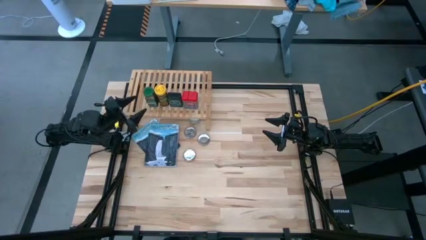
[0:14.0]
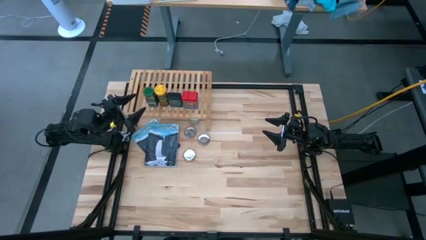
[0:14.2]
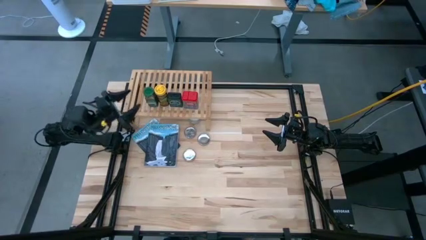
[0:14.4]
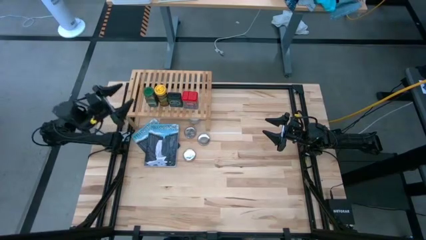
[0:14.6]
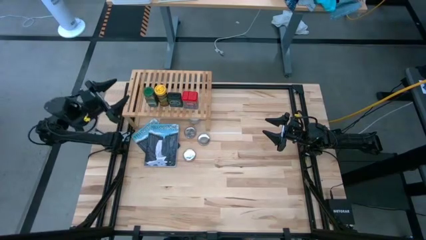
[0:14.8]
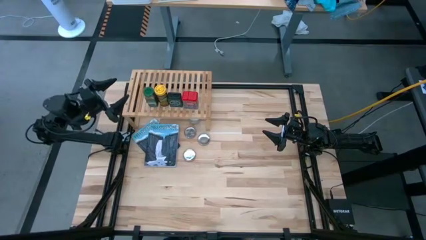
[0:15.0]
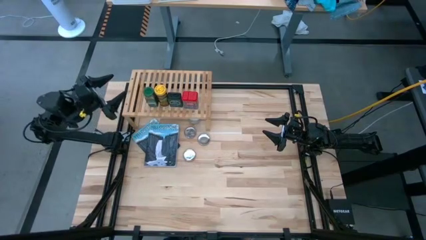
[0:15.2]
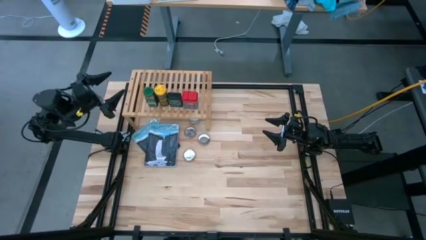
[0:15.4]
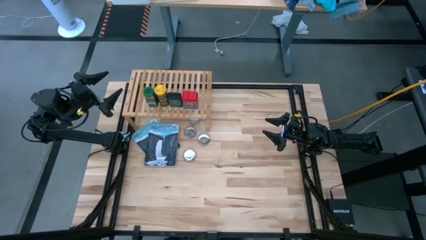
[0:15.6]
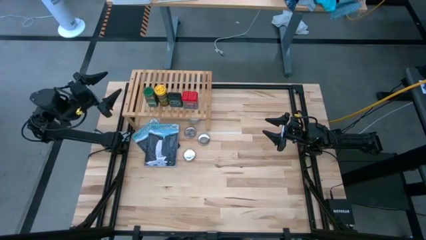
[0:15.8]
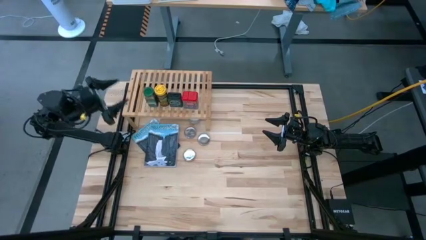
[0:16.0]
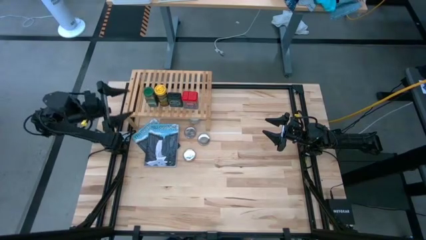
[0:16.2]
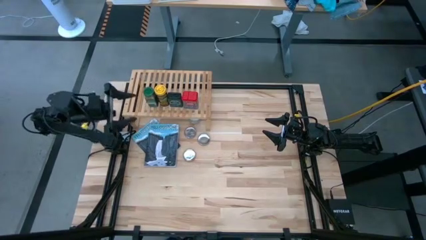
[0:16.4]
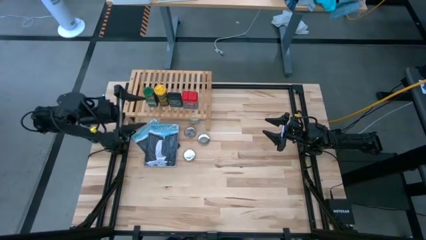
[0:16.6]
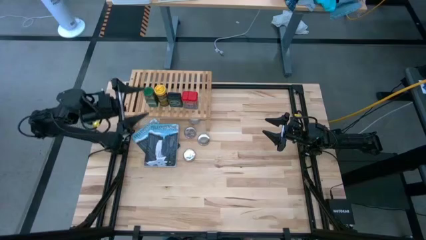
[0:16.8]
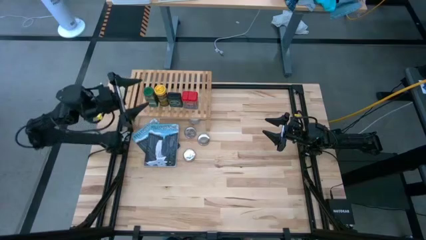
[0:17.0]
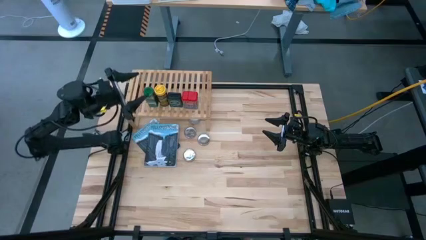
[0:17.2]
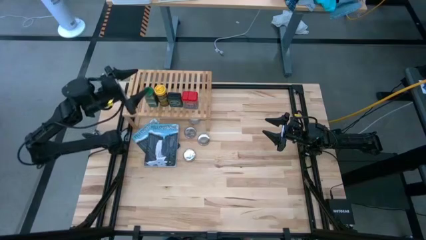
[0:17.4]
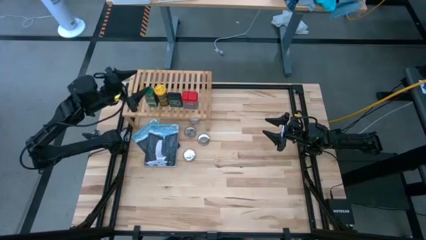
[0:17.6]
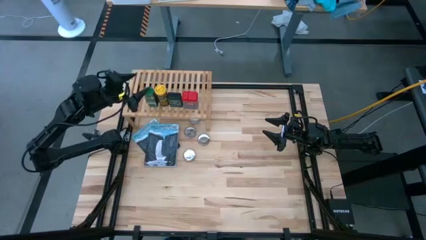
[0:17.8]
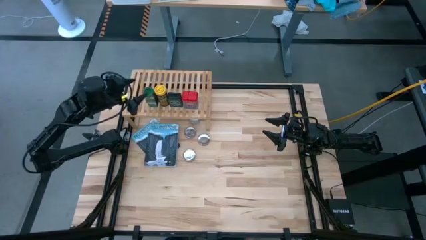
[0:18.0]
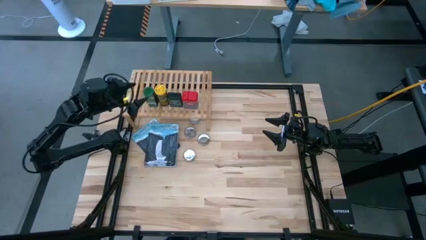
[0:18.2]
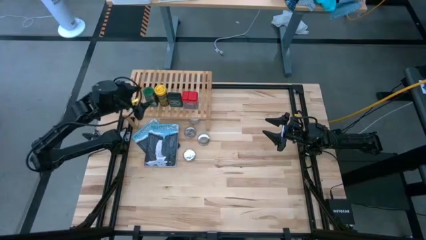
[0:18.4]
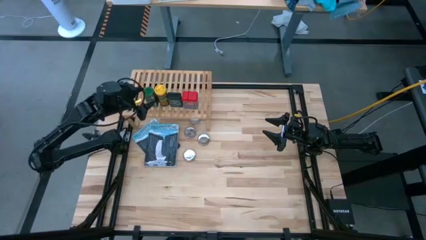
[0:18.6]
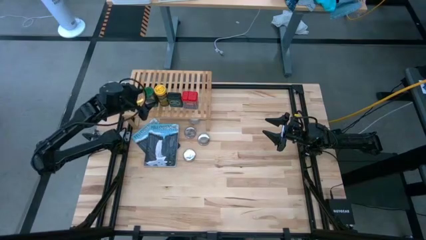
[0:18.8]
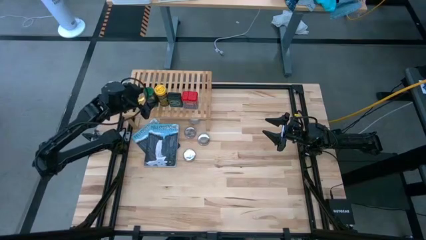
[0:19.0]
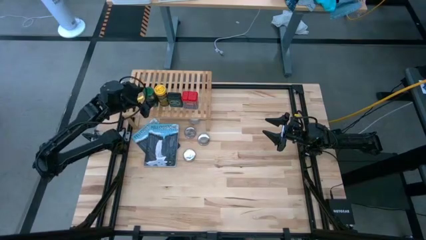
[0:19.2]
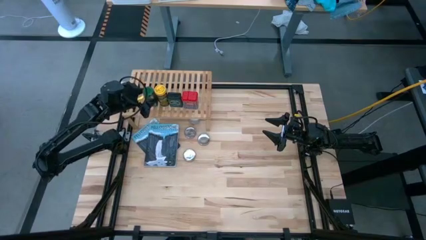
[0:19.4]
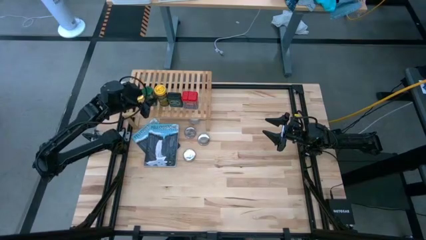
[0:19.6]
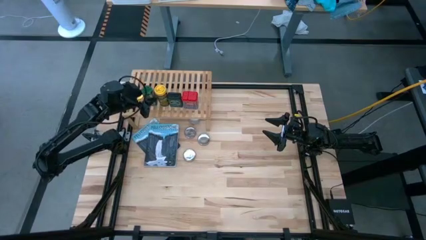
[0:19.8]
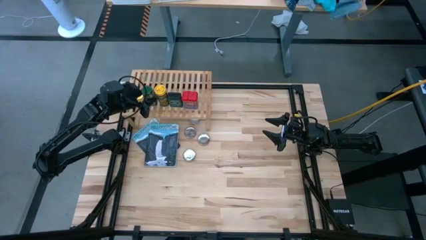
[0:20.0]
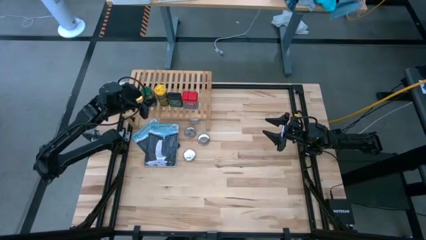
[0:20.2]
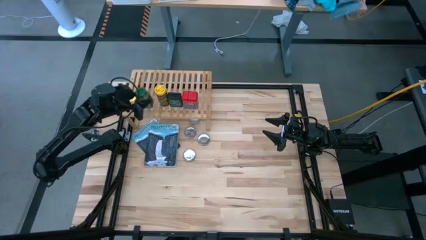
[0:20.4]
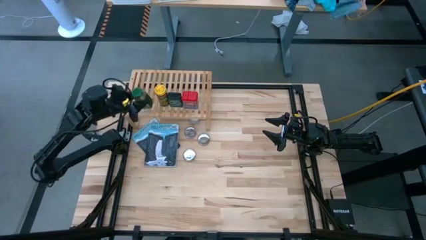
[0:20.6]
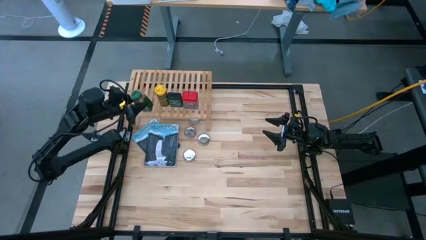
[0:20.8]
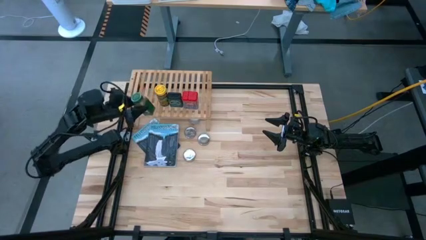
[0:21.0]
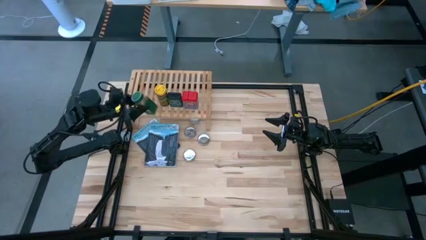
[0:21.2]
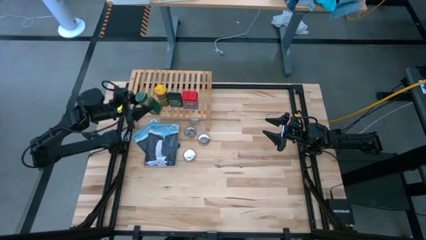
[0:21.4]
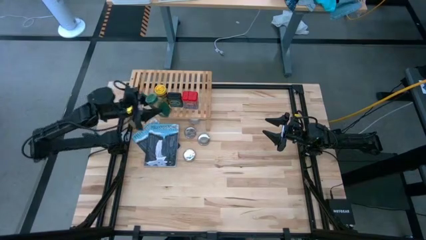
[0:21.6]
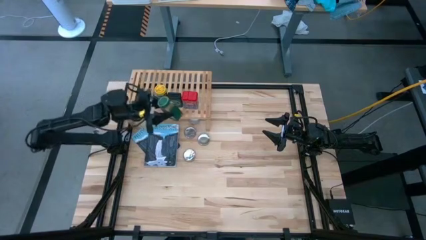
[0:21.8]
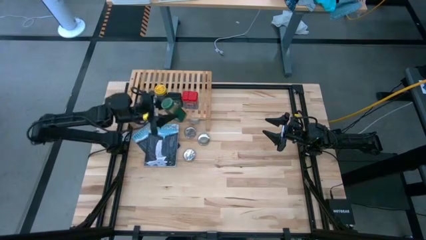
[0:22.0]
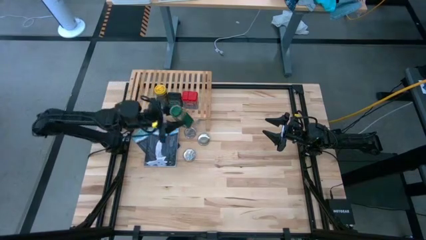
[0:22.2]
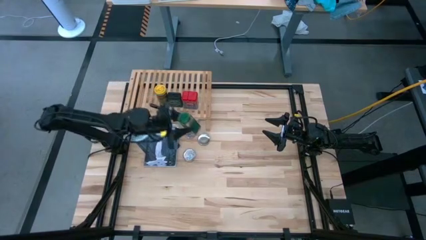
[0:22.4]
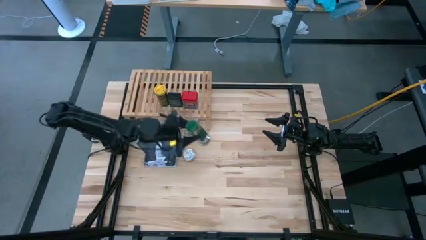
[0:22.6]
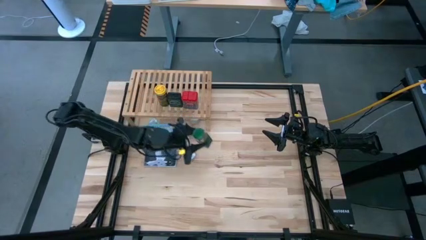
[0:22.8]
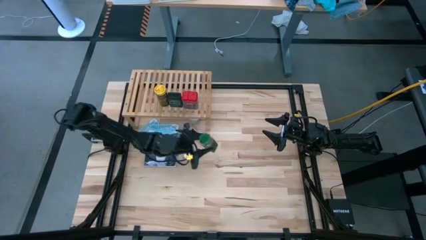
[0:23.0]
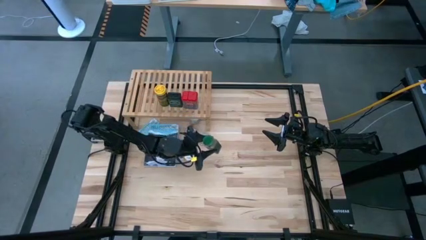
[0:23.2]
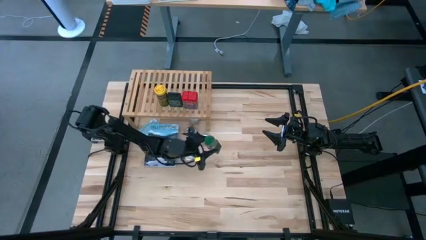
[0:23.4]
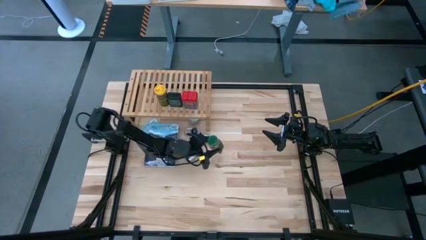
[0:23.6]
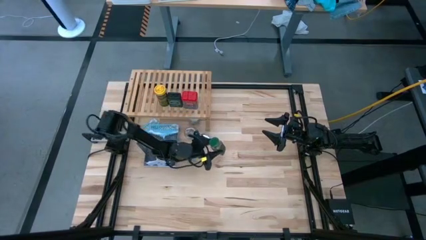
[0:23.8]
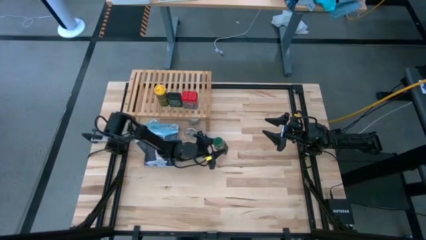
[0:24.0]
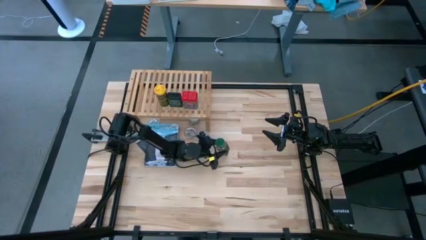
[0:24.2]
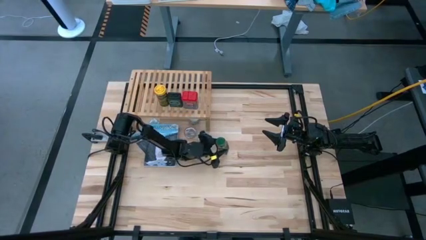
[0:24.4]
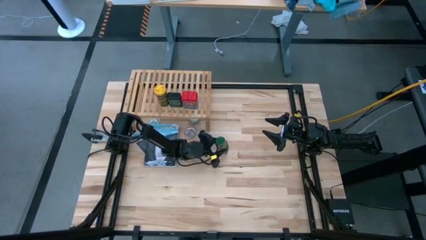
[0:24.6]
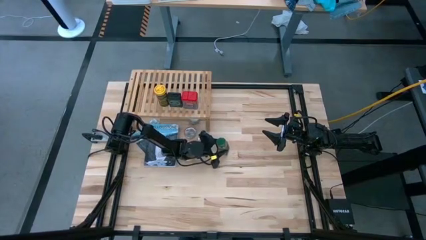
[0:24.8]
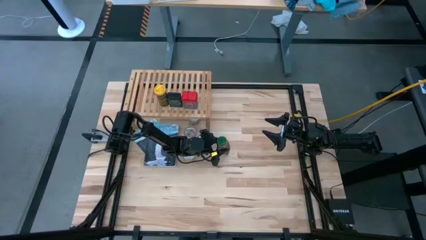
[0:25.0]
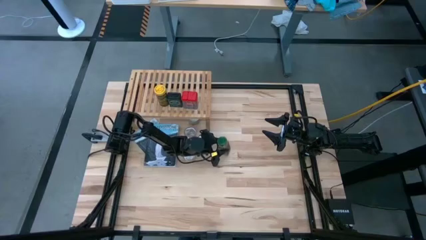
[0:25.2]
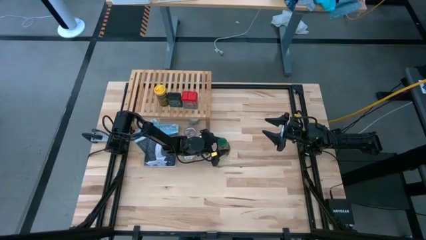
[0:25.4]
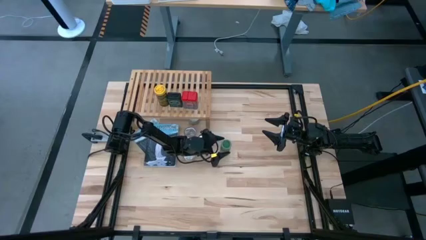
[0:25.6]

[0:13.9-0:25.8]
Task: Shelf spices
Remove the green seasoning bottle from the shelf

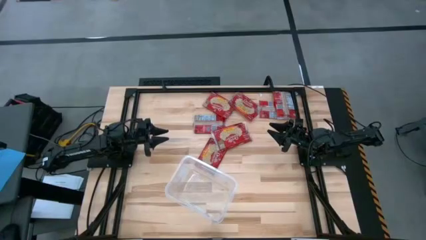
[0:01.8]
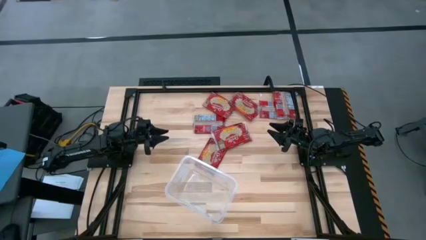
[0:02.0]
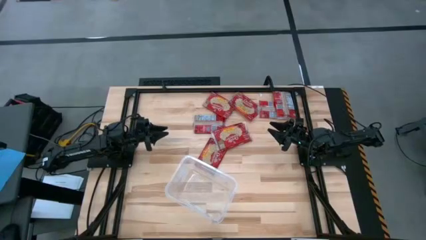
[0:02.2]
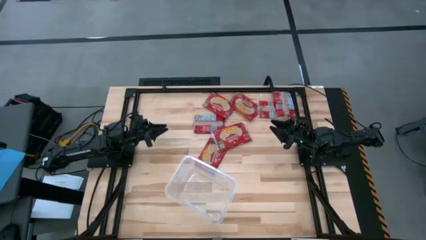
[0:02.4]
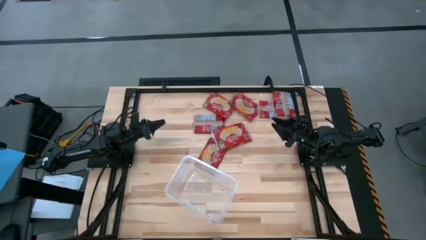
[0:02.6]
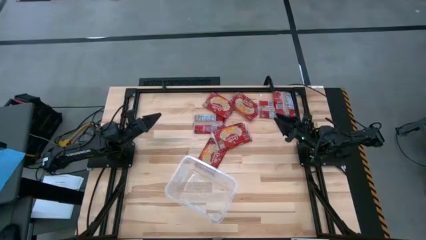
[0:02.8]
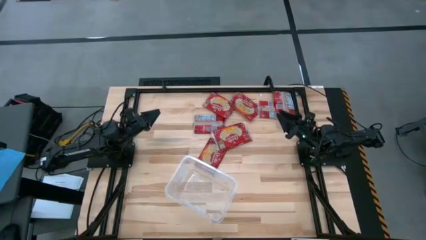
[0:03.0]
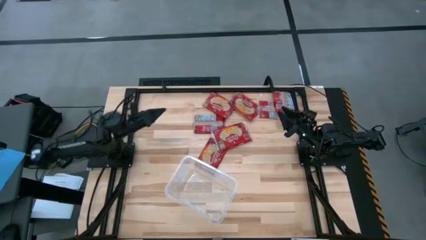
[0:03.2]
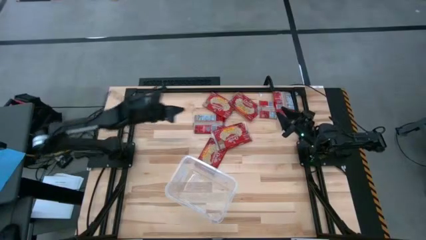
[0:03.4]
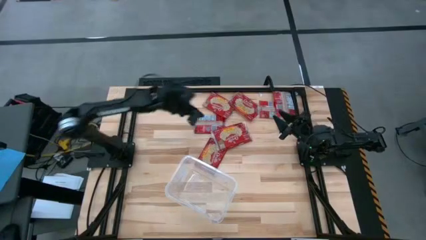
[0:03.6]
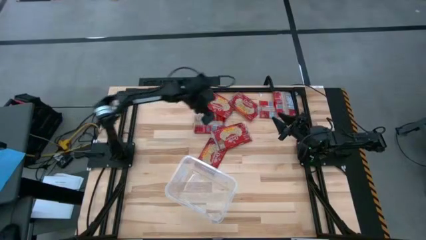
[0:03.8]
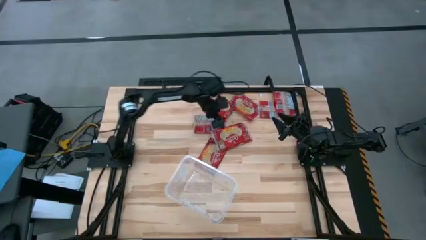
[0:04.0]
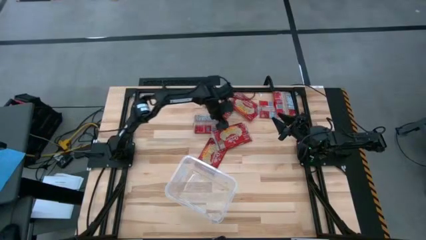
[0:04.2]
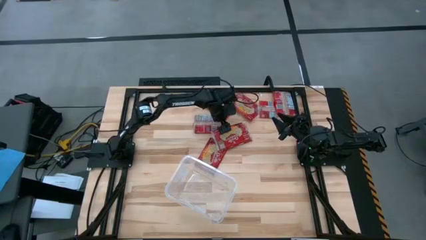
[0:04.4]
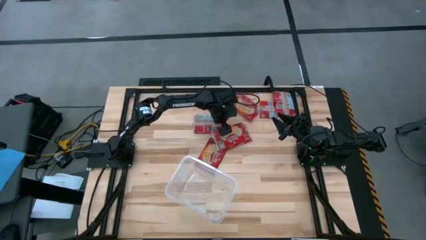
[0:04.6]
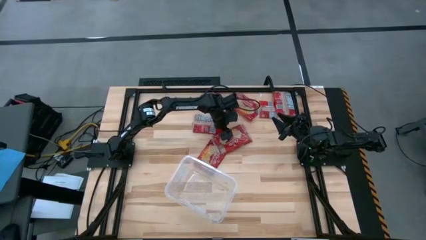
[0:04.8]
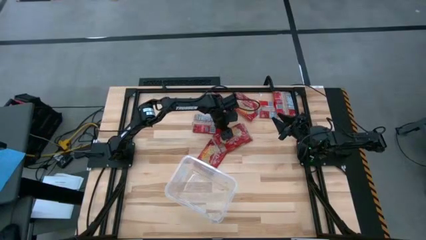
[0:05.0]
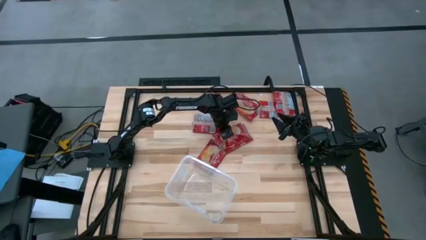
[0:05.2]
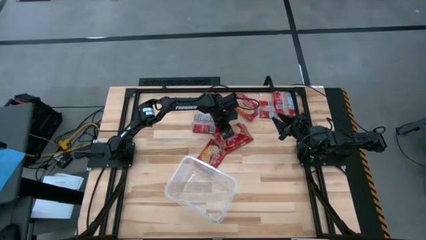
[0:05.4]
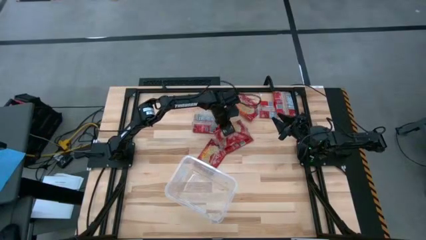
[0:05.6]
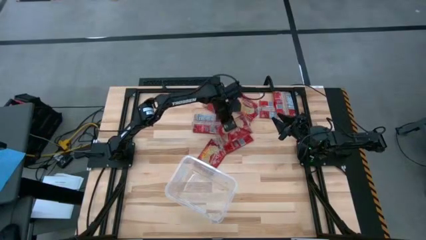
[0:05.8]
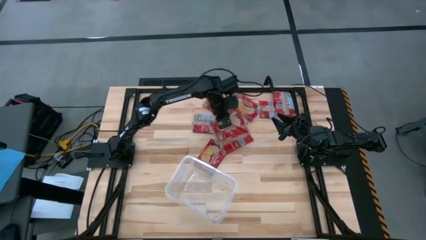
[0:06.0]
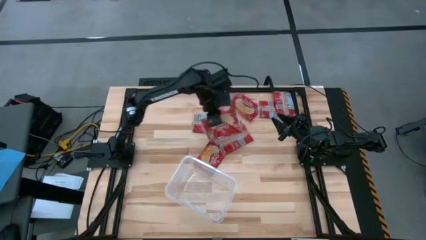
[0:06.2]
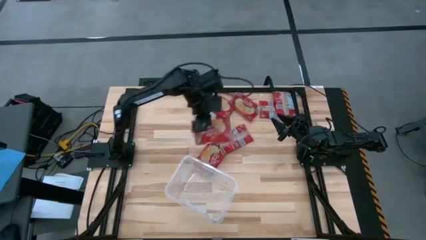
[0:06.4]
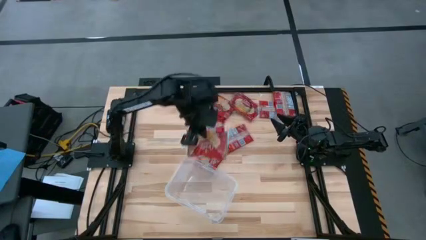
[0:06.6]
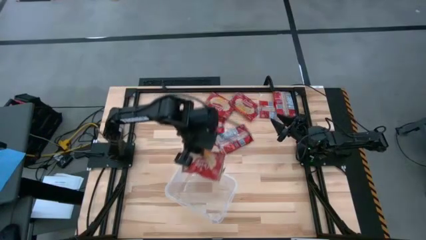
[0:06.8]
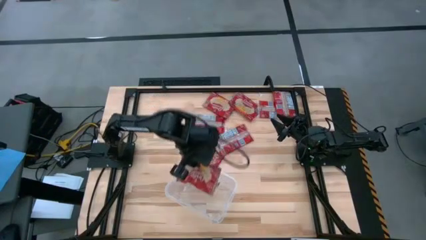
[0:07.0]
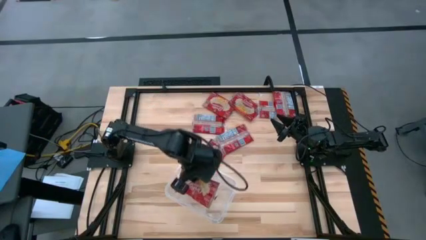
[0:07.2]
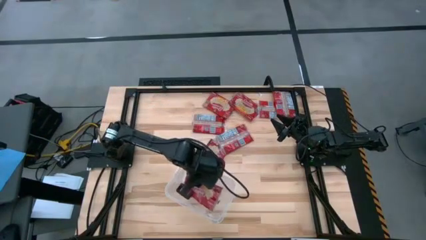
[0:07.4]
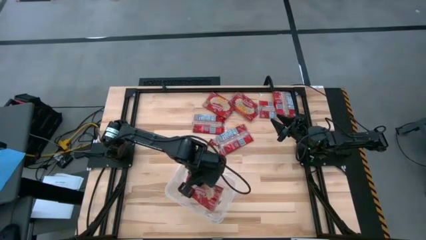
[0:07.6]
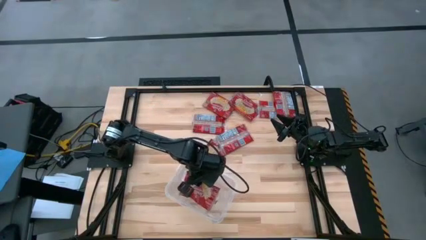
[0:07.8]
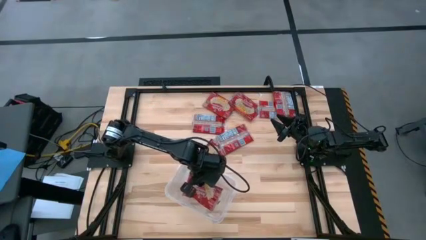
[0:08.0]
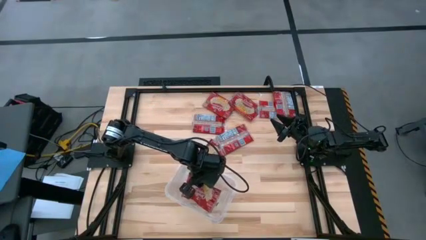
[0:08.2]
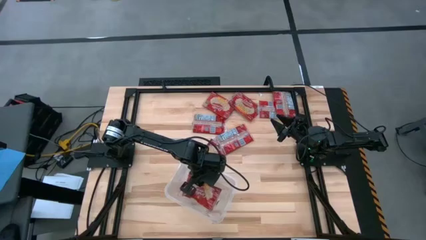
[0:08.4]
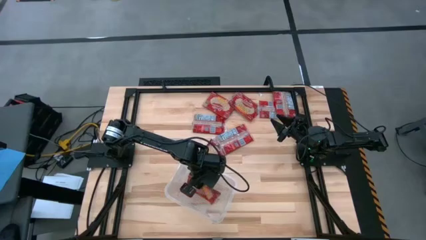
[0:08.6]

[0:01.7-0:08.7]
Task: Sort popcorn bags into baskets
Put the red popcorn bag into the container
